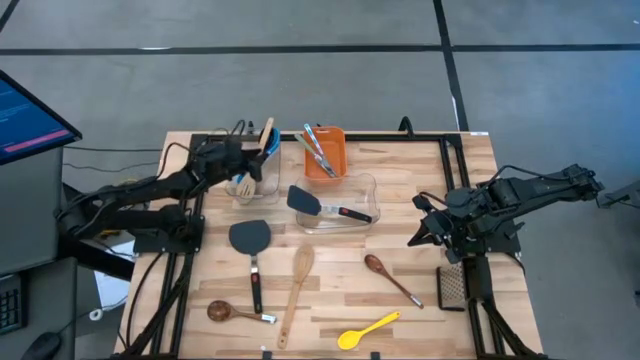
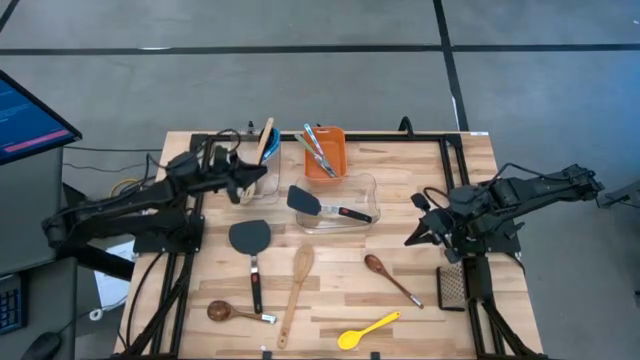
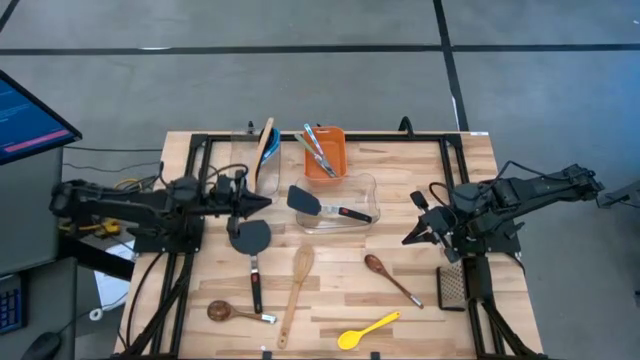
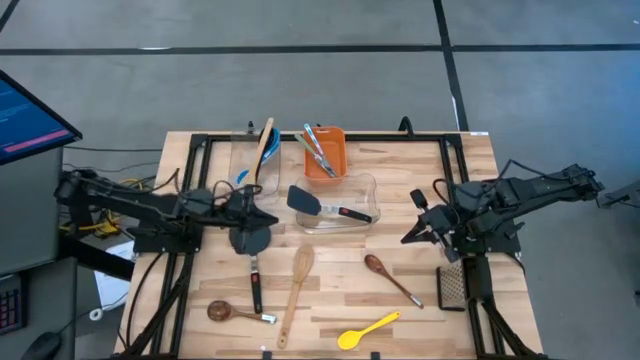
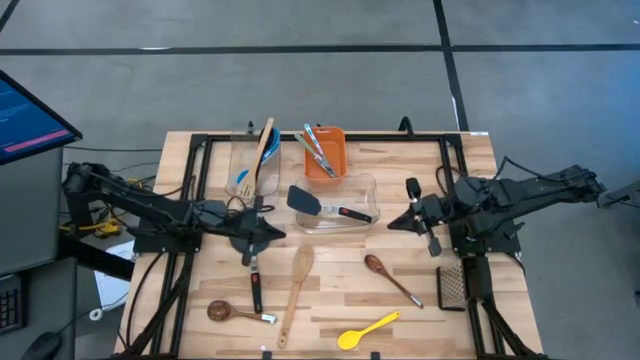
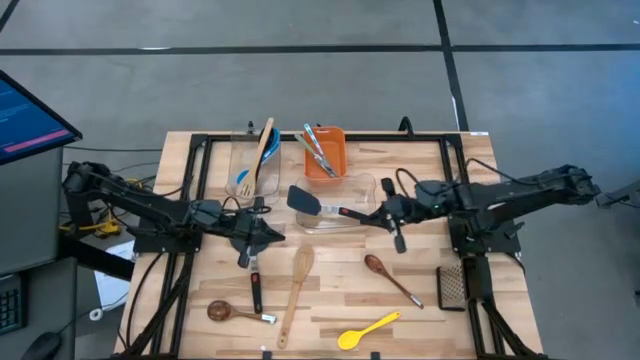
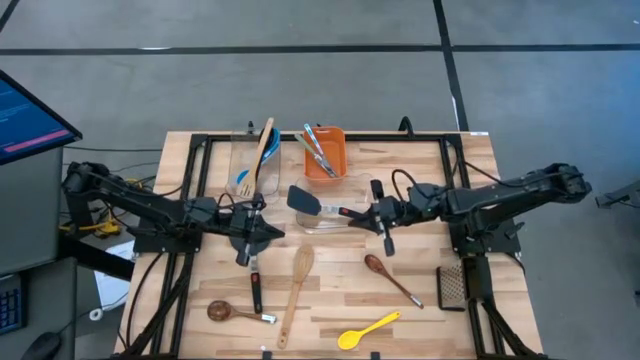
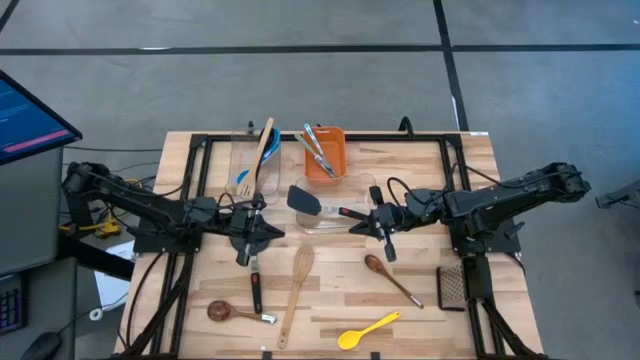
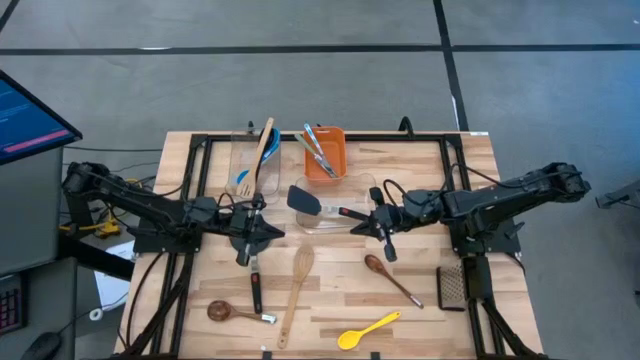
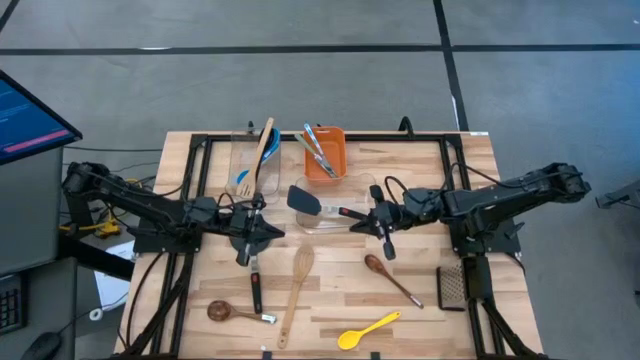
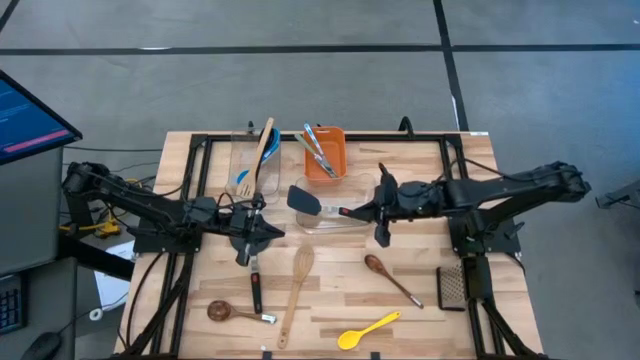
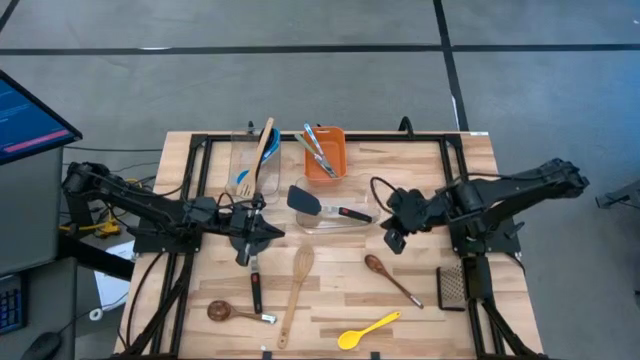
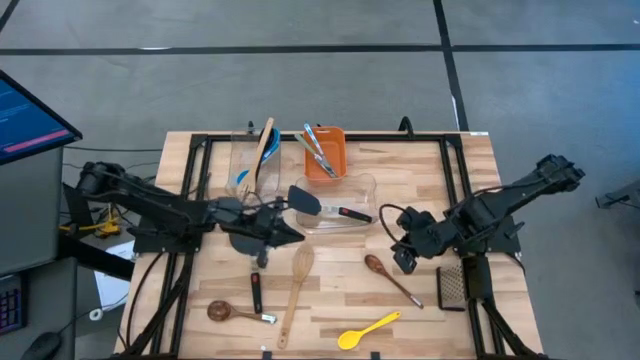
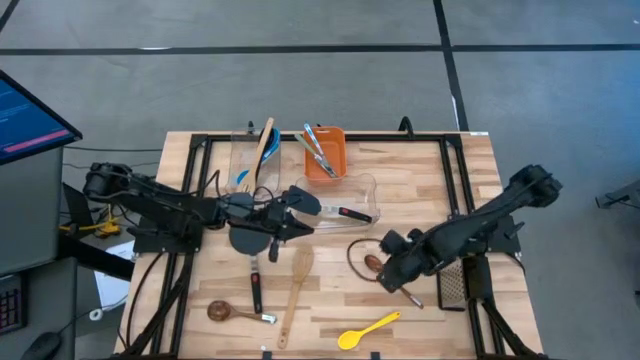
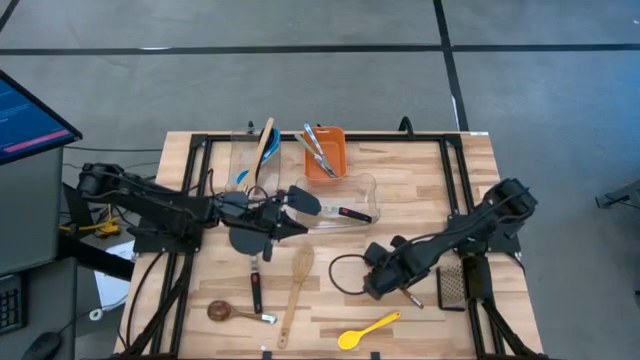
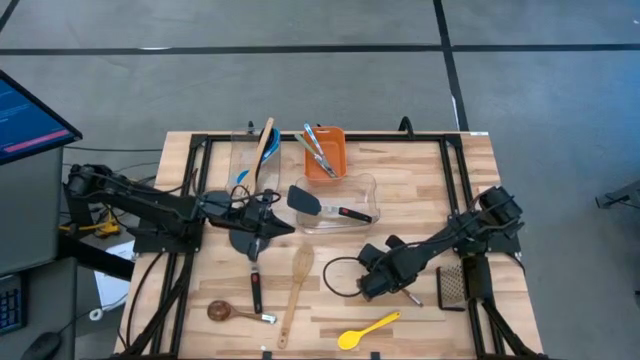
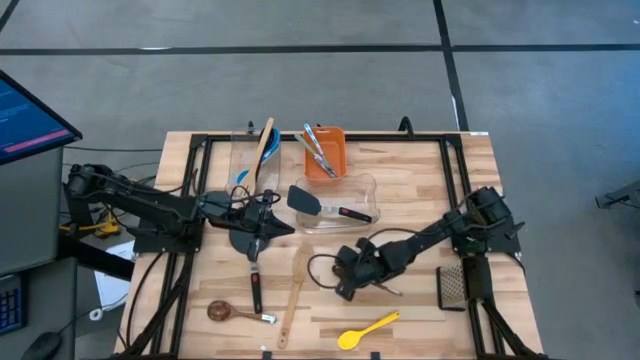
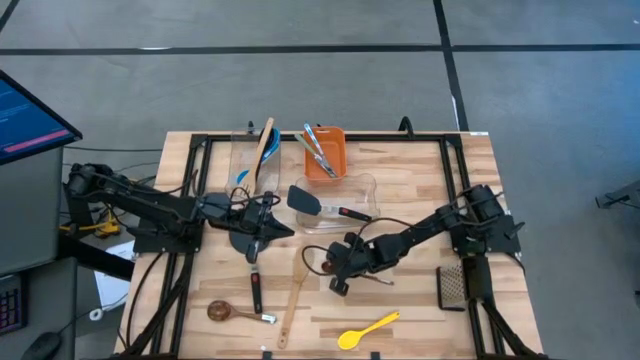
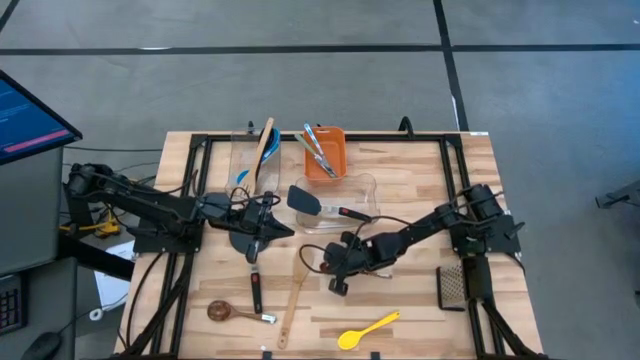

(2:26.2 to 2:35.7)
Task: Pick & Place Kitchen Items
Adjust the dark brown wooden spoon

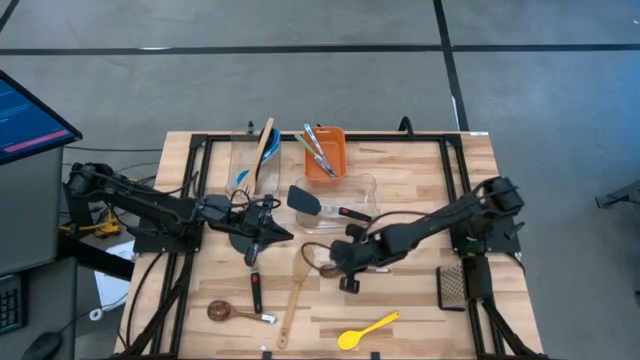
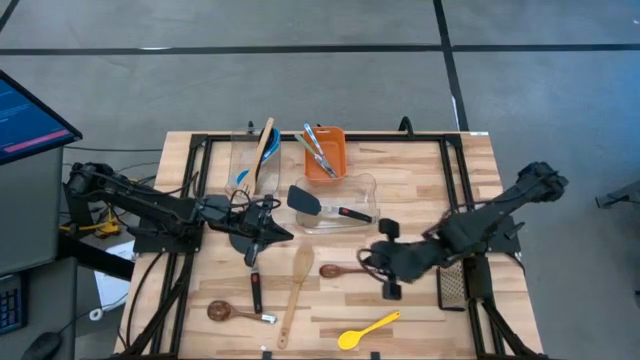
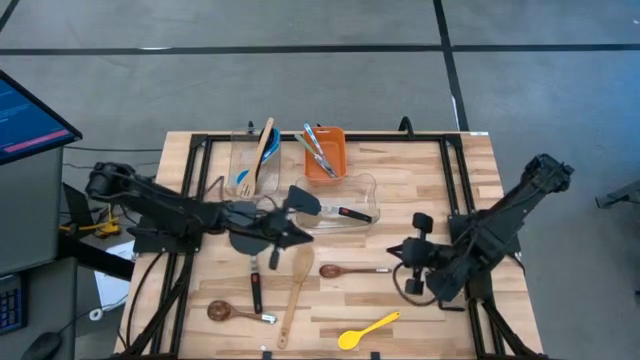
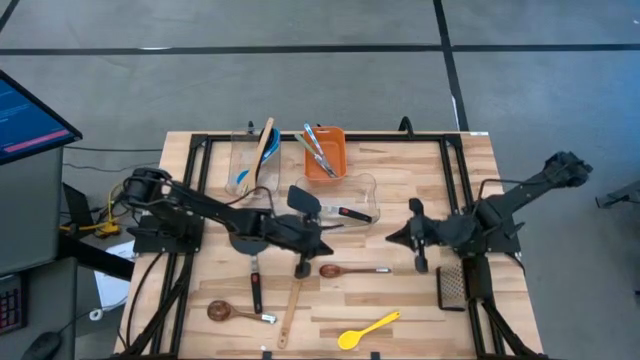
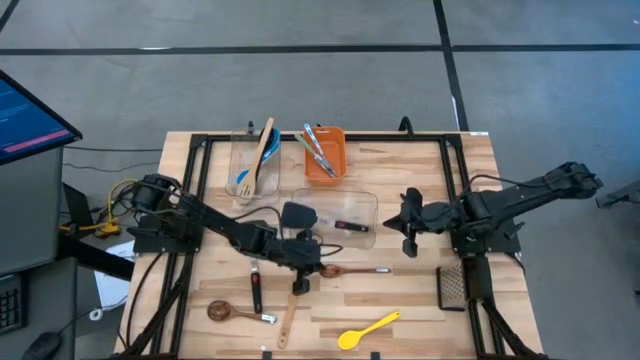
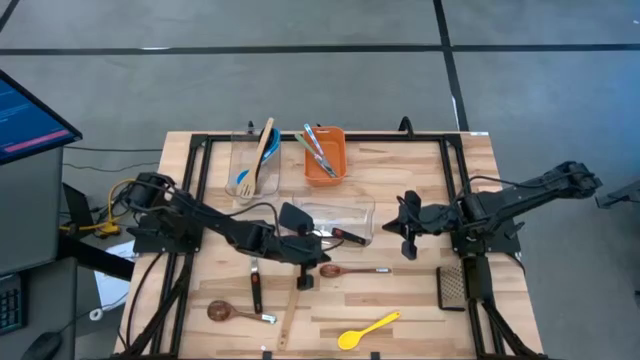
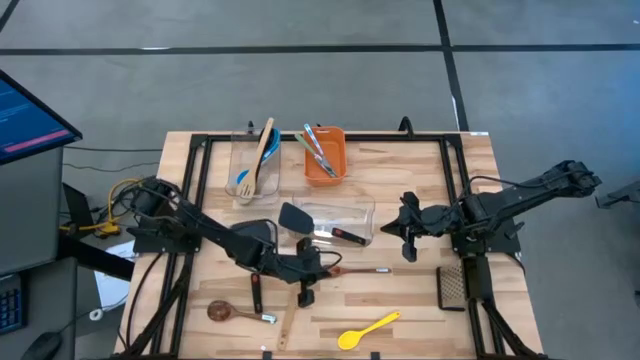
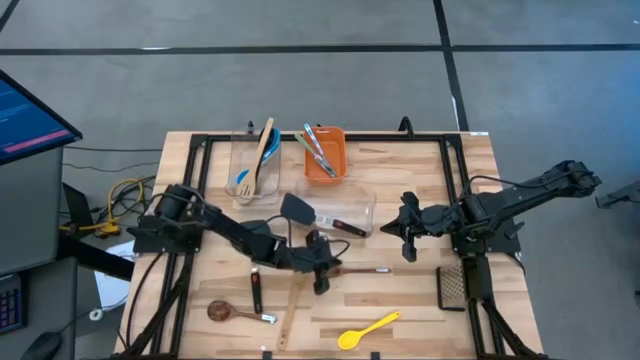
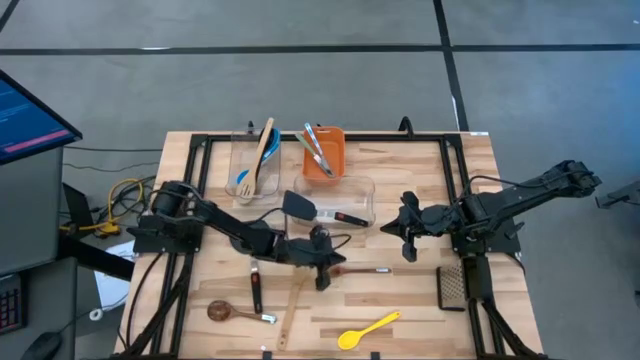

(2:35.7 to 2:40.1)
Adjust the bottom transparent bin

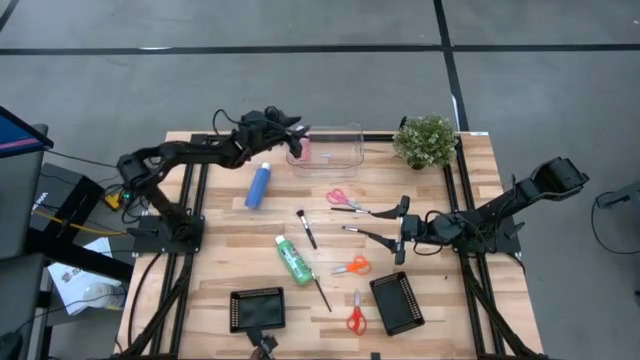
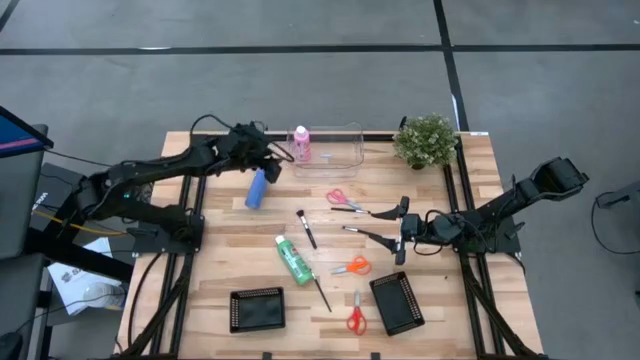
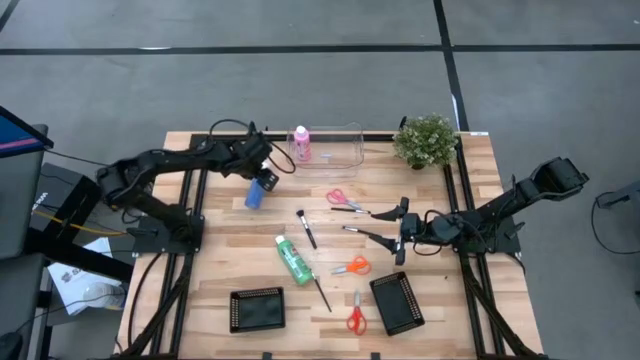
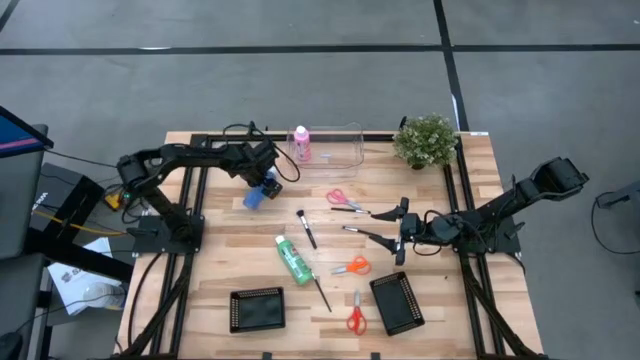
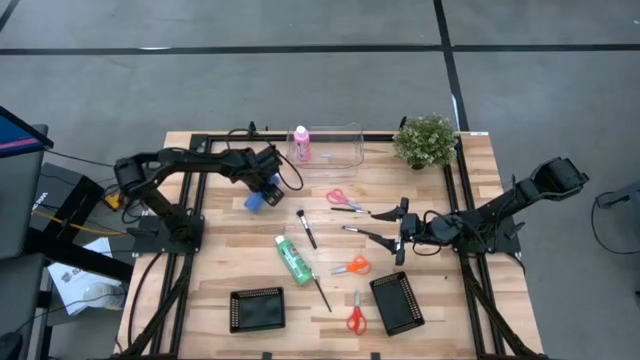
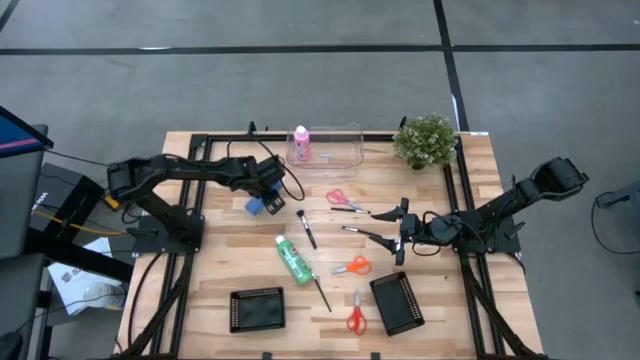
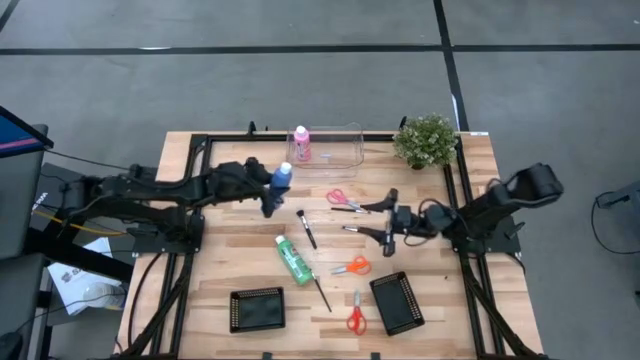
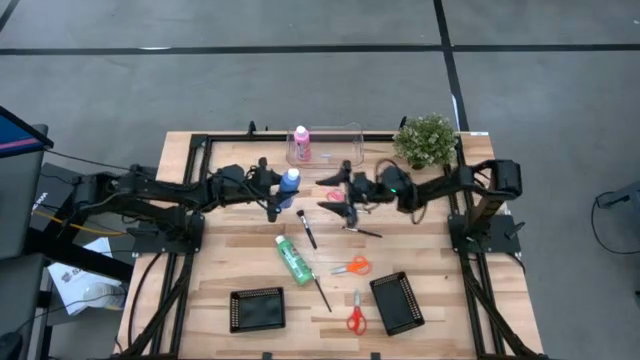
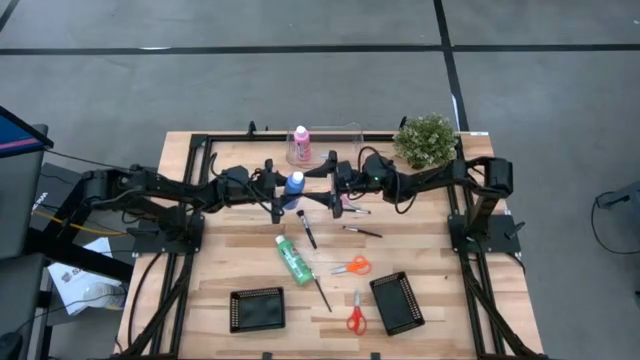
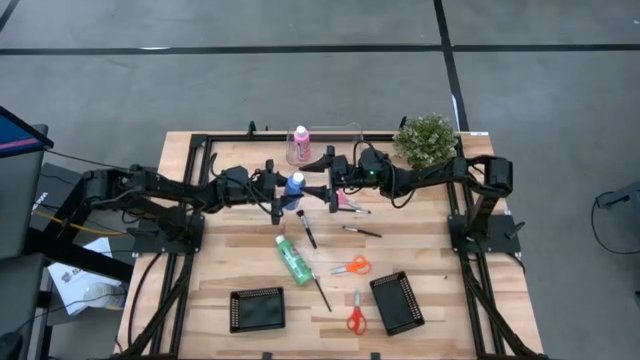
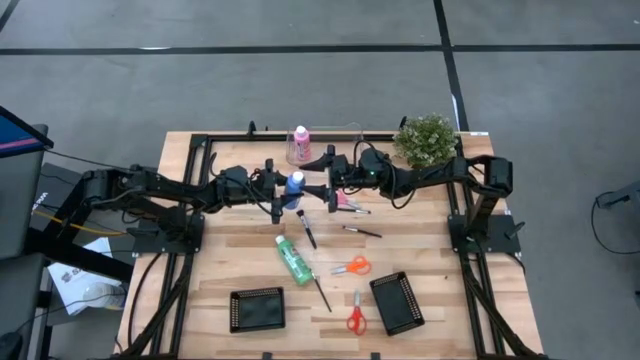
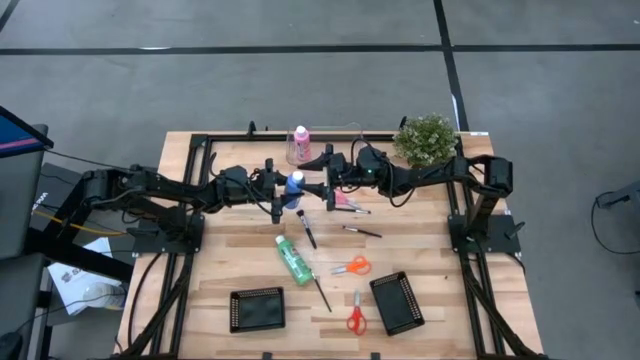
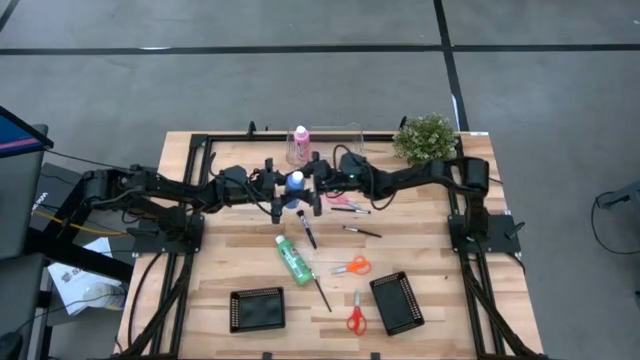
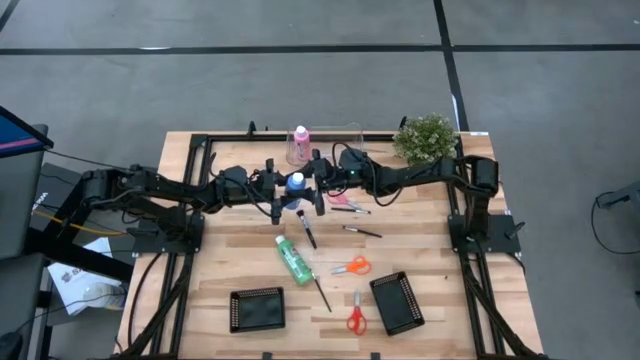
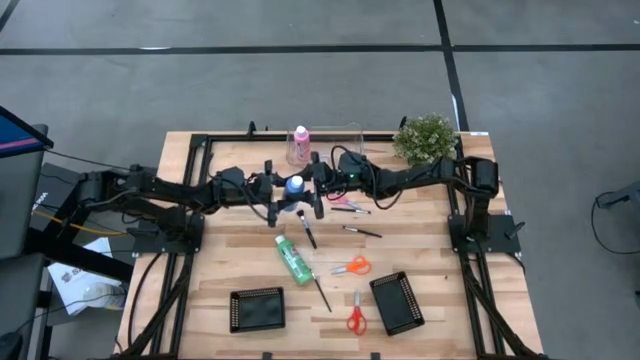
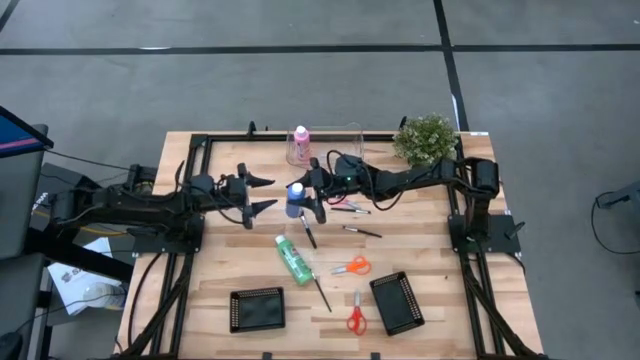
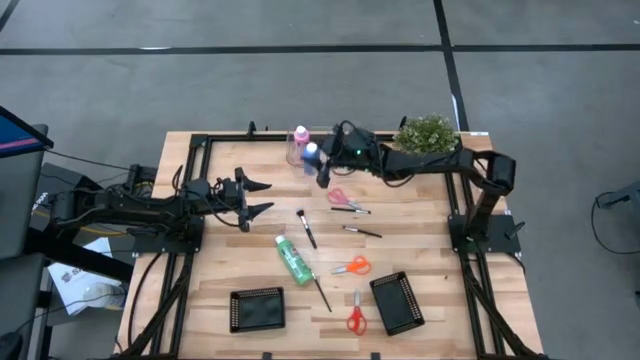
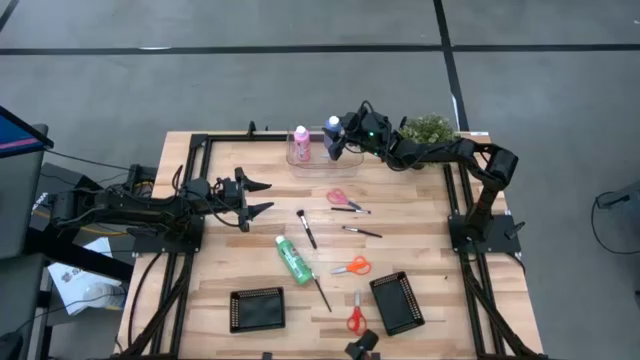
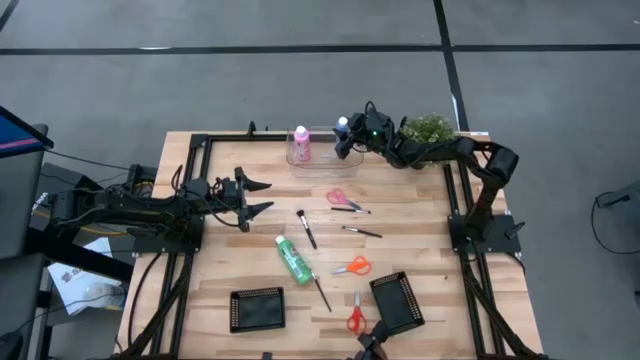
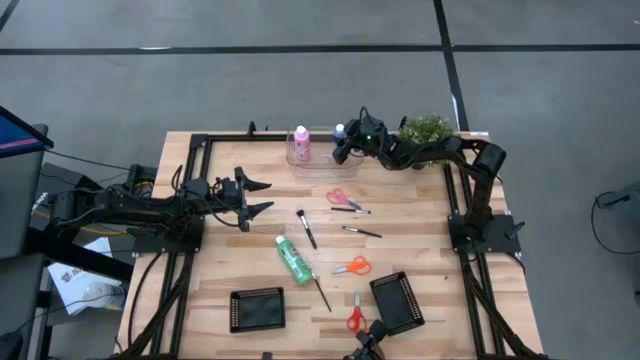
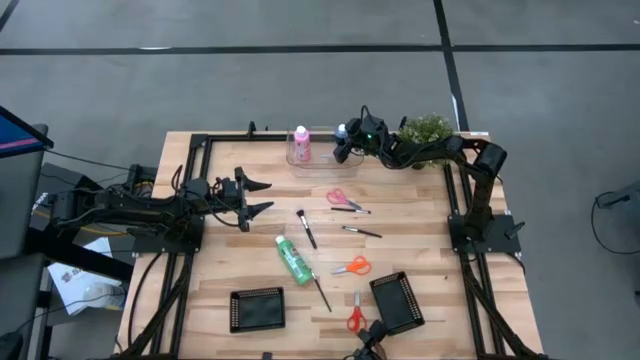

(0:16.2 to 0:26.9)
Task: Pick & Place Paint Supplies
Put the blue paint bottle into the transparent bin
